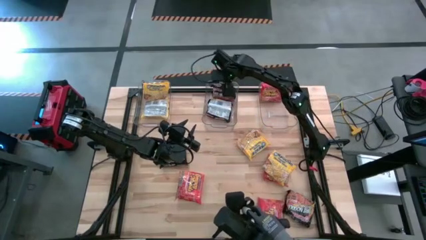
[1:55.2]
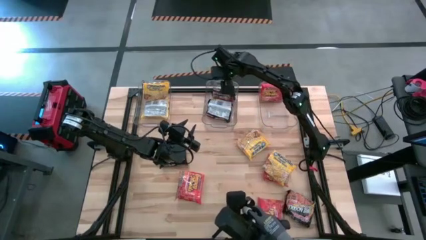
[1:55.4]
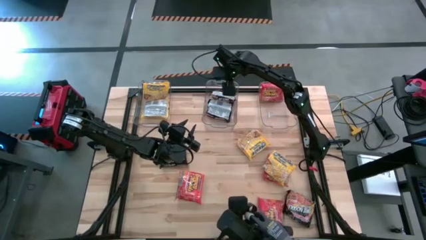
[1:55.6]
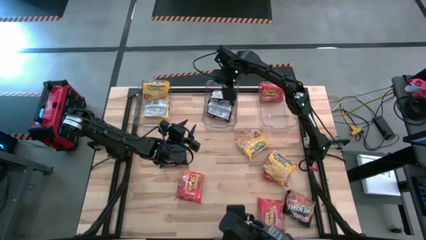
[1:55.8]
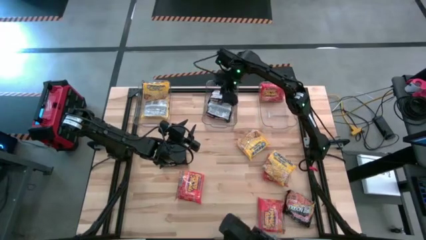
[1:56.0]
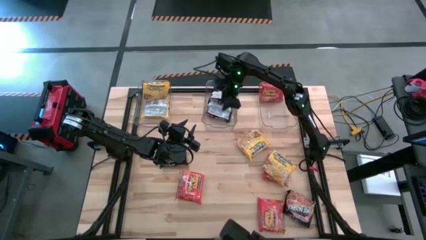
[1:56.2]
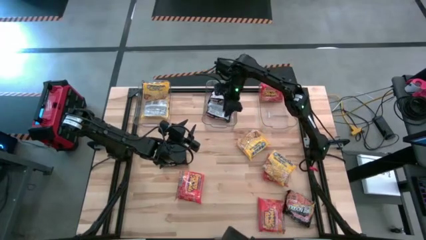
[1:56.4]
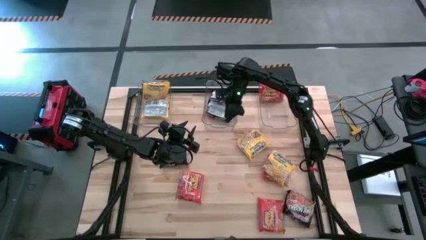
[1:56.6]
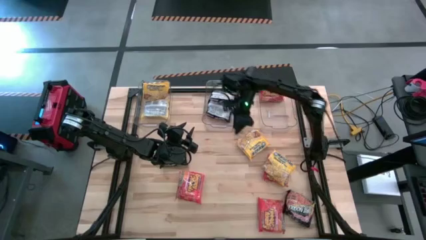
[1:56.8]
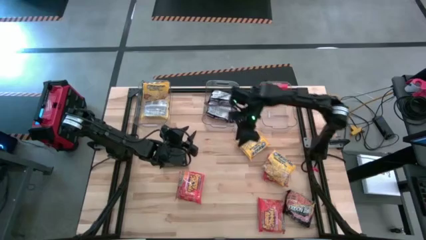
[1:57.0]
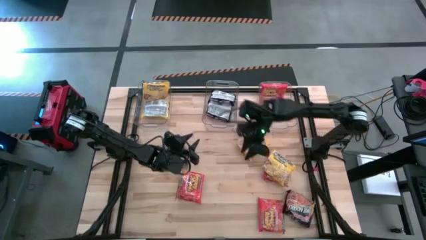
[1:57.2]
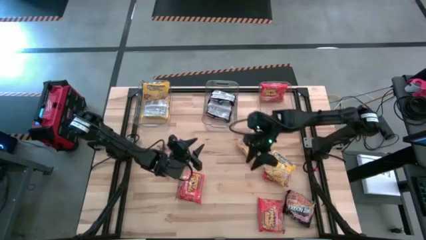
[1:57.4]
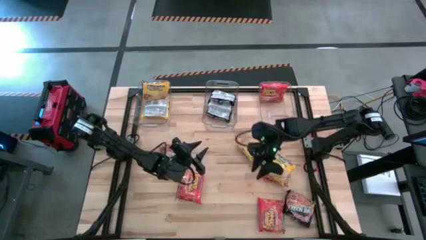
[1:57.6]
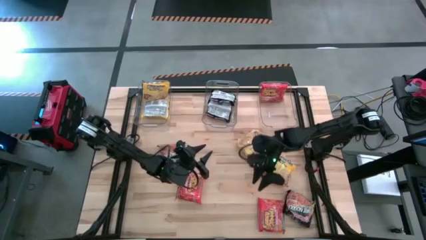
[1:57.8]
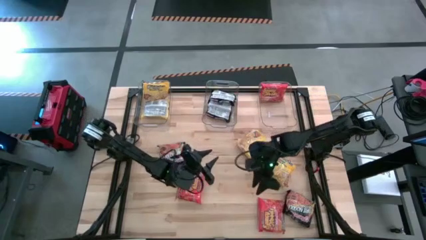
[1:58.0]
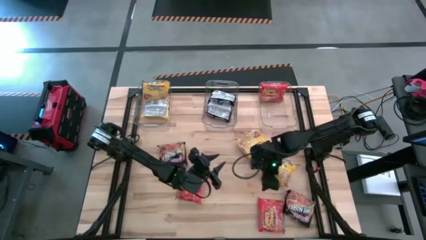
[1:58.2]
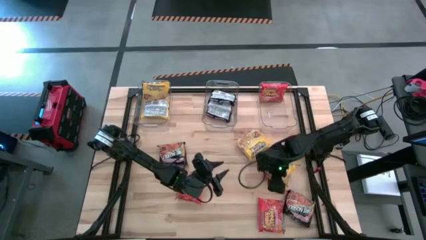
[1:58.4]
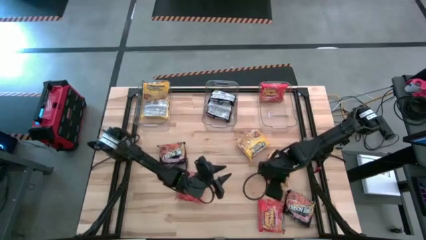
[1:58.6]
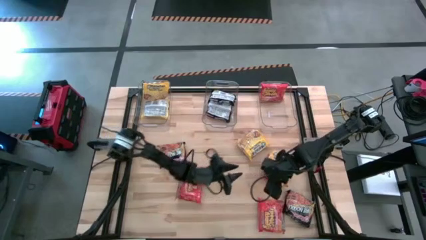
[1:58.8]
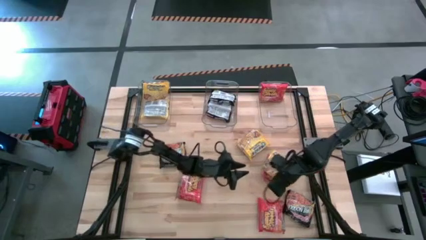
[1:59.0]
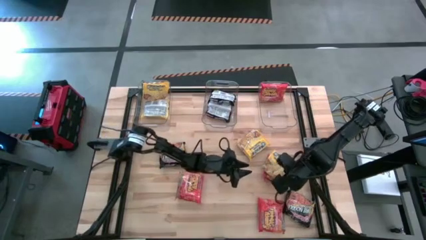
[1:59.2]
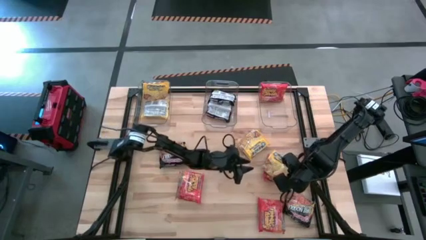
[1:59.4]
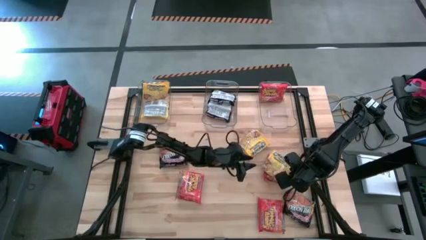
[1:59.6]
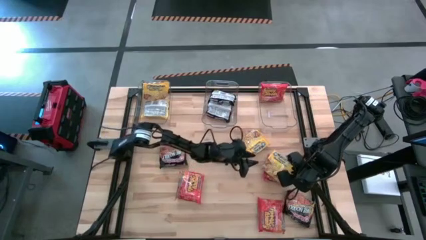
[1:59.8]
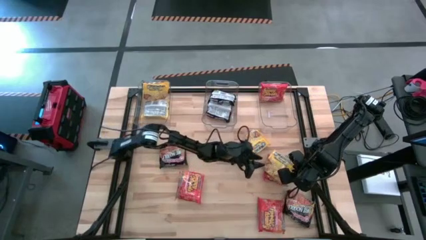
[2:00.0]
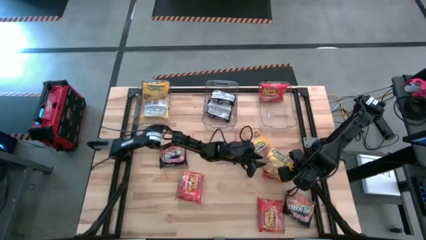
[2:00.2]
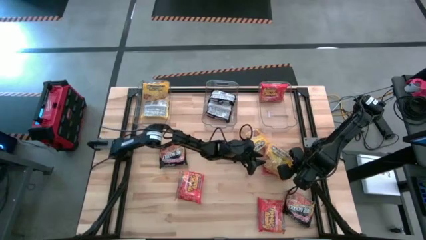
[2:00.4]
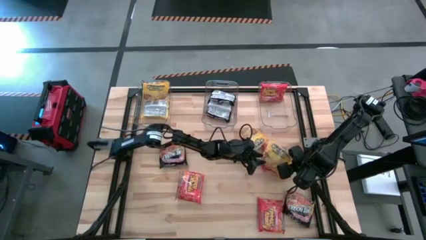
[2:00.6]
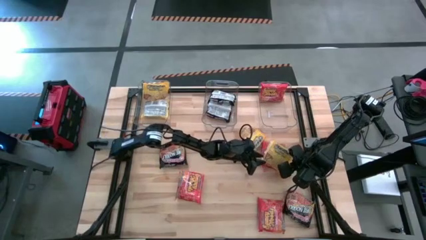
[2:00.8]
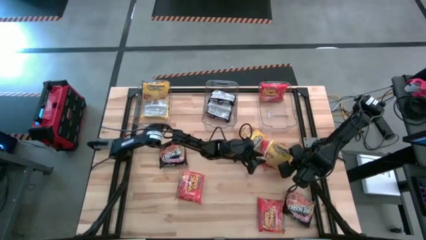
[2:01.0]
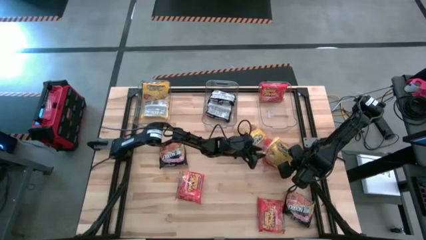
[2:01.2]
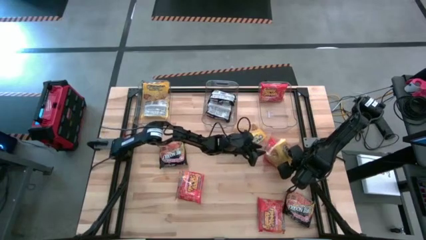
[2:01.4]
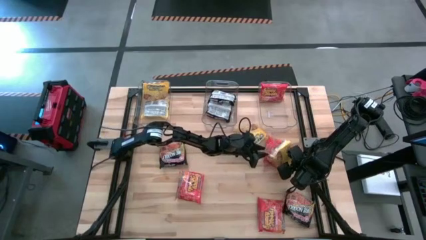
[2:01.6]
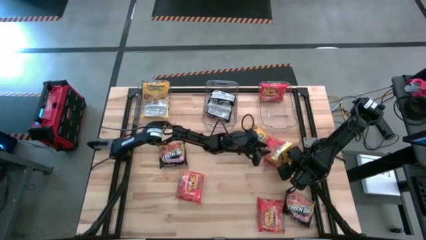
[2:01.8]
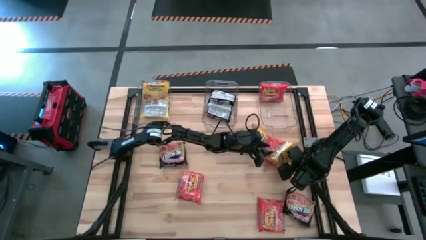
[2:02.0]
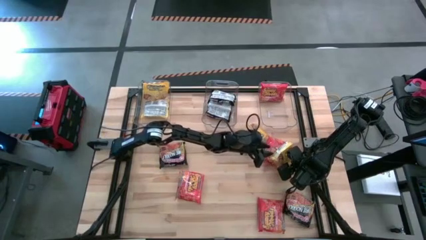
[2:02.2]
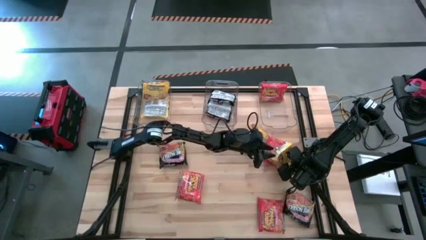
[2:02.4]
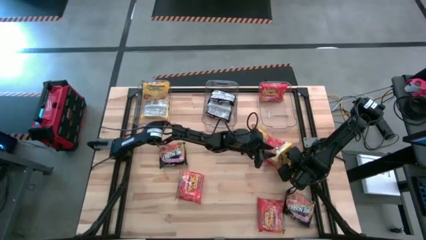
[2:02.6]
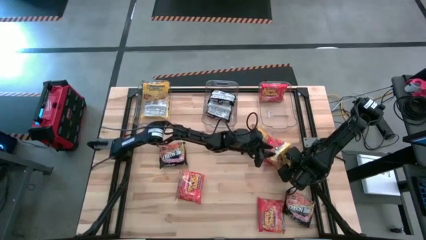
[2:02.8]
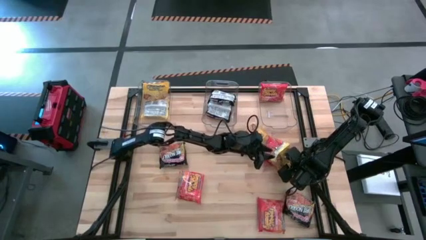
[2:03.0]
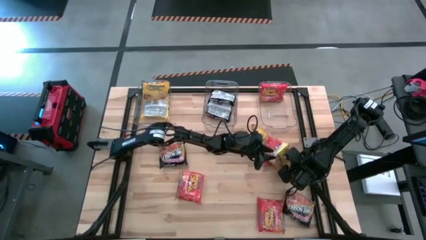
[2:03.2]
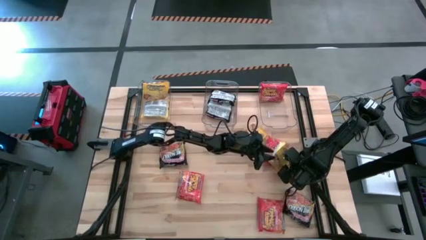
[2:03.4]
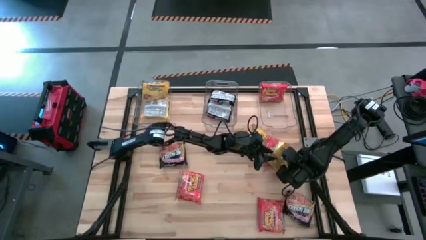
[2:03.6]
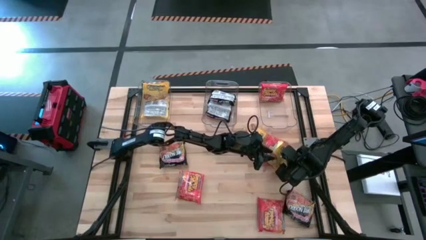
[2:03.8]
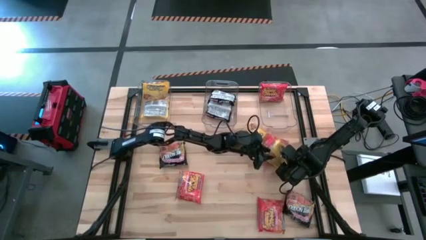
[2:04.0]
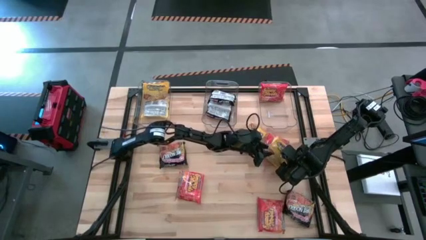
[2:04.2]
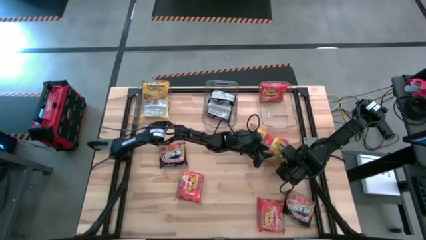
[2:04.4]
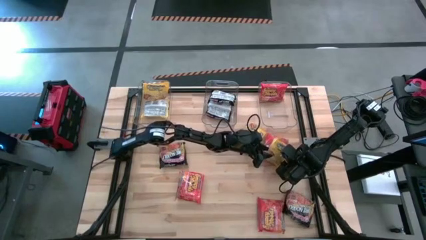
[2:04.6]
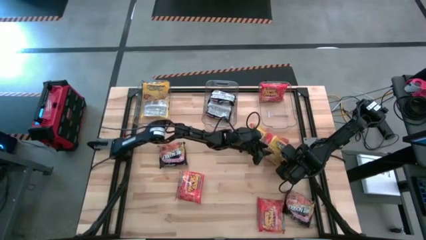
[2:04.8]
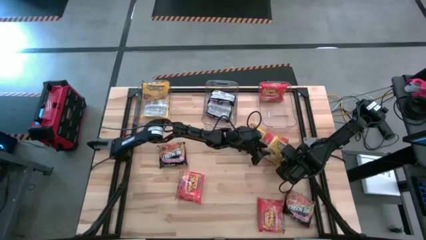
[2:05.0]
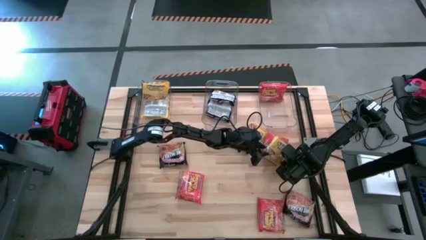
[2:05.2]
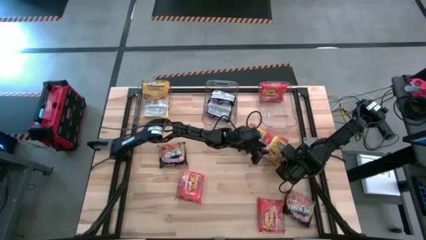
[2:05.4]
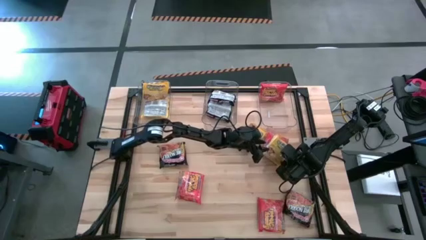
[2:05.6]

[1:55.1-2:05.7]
Task: Sort Maruchan noodles
Put the yellow noodle pack into the left transparent bin
